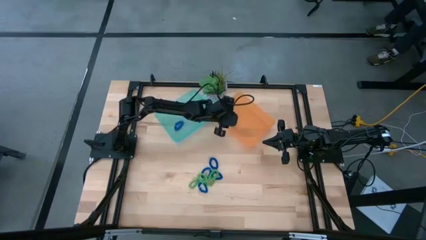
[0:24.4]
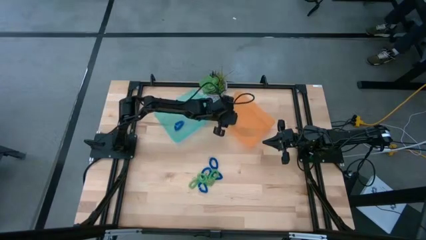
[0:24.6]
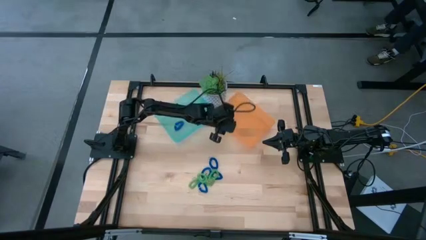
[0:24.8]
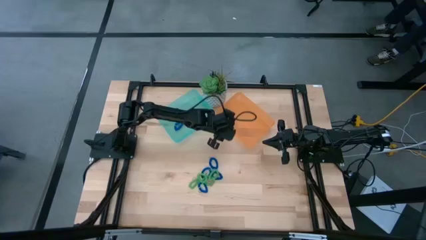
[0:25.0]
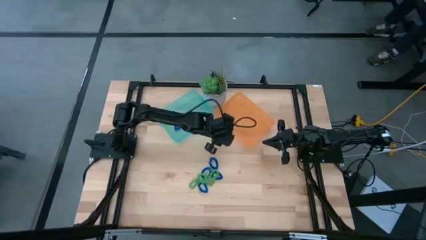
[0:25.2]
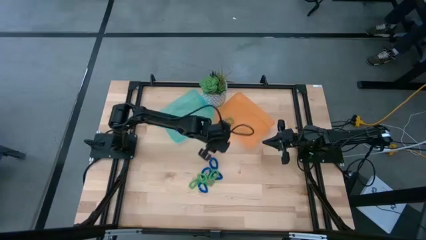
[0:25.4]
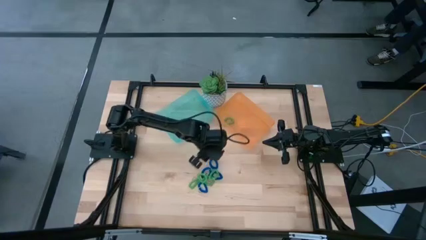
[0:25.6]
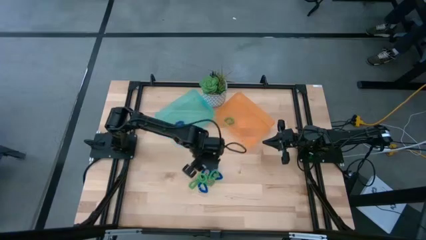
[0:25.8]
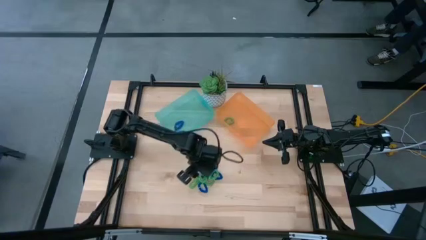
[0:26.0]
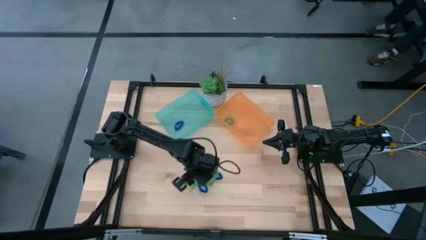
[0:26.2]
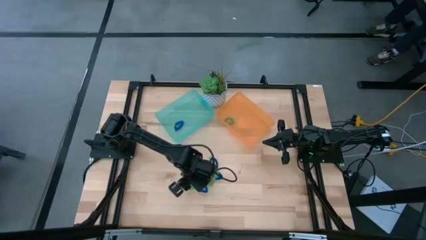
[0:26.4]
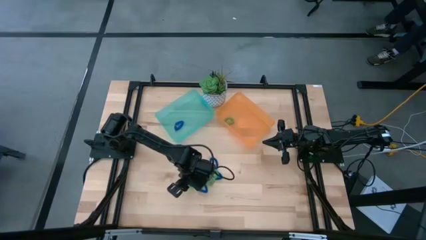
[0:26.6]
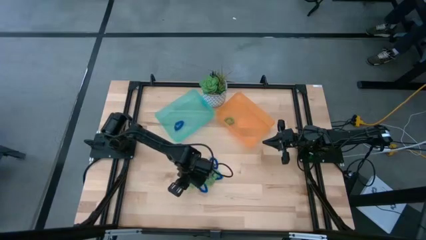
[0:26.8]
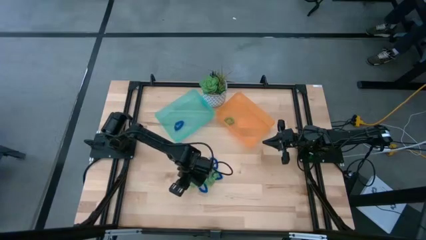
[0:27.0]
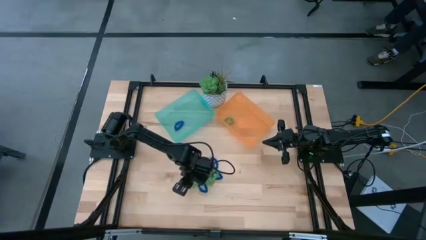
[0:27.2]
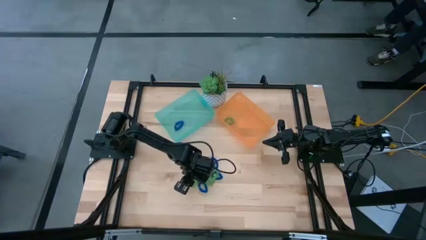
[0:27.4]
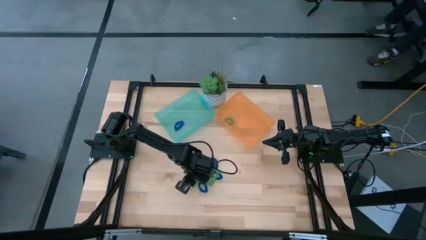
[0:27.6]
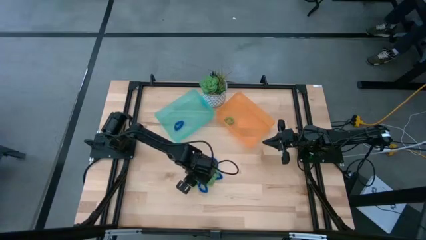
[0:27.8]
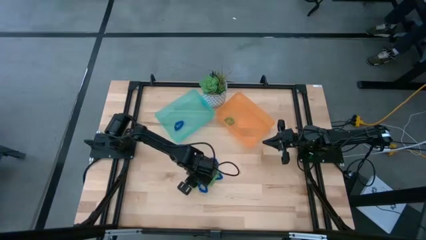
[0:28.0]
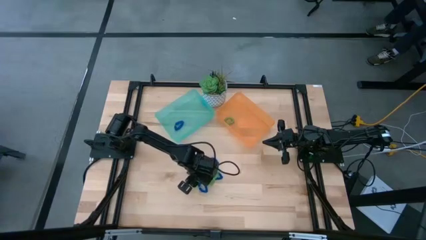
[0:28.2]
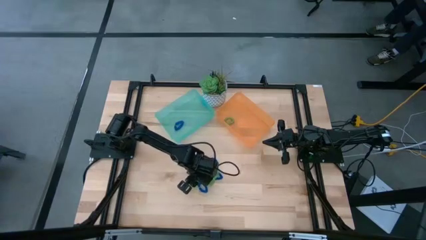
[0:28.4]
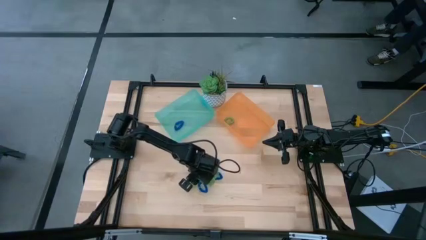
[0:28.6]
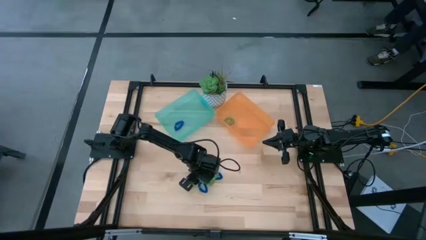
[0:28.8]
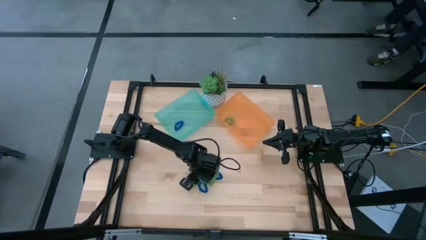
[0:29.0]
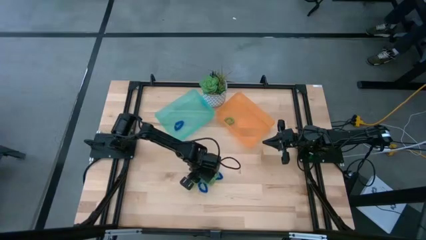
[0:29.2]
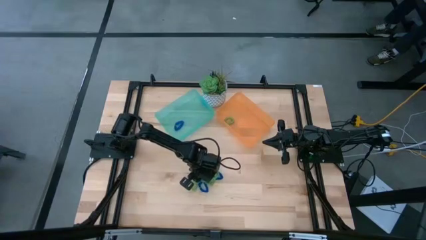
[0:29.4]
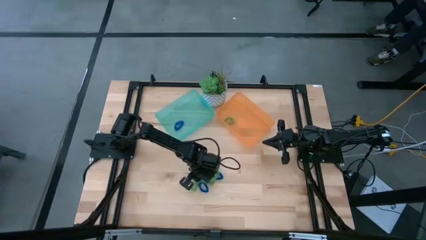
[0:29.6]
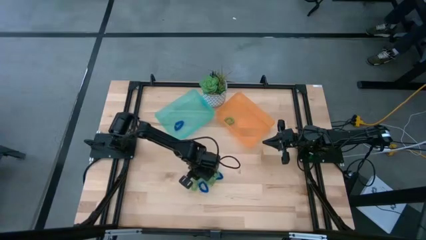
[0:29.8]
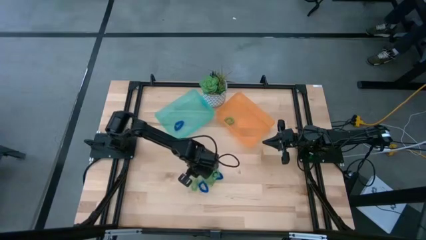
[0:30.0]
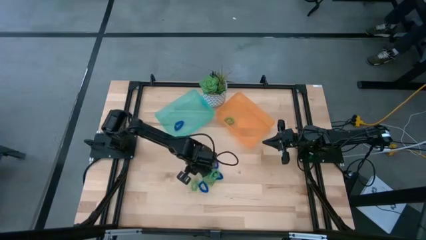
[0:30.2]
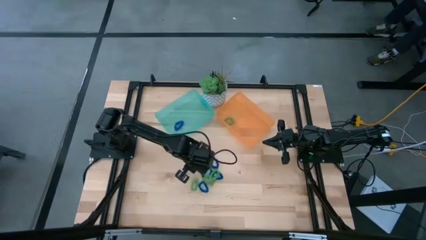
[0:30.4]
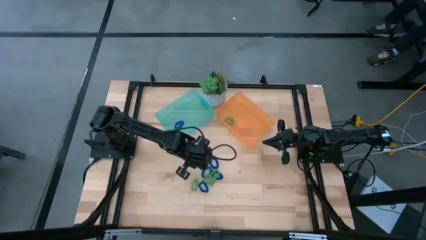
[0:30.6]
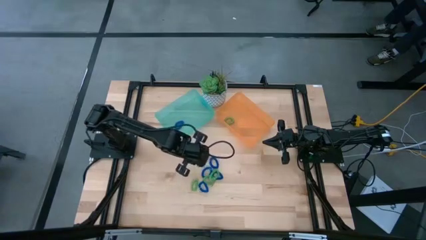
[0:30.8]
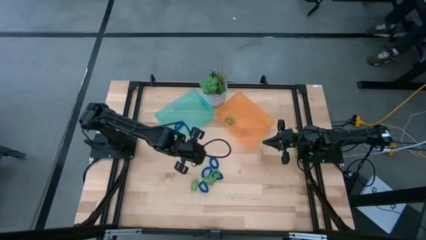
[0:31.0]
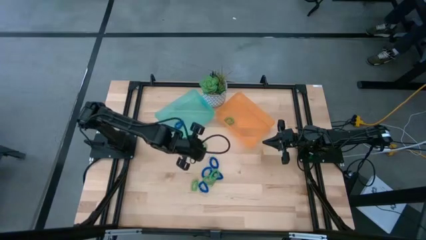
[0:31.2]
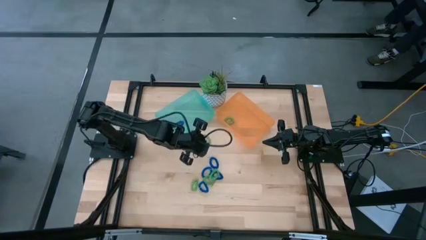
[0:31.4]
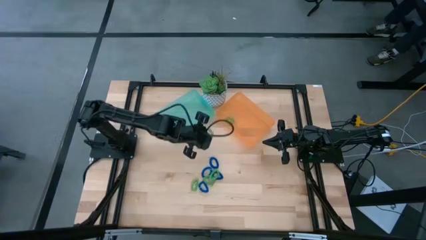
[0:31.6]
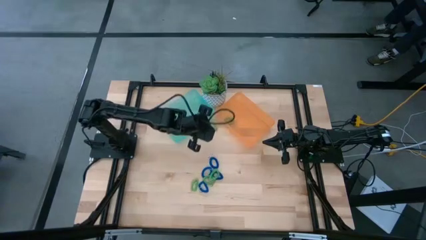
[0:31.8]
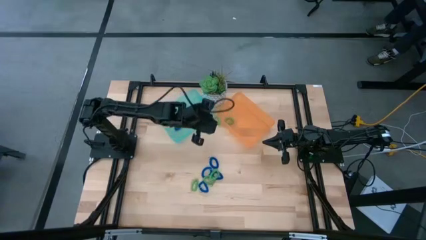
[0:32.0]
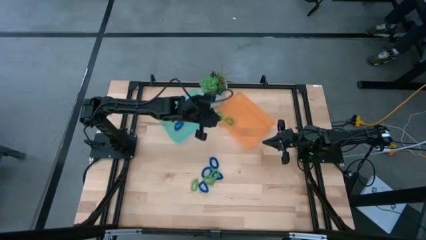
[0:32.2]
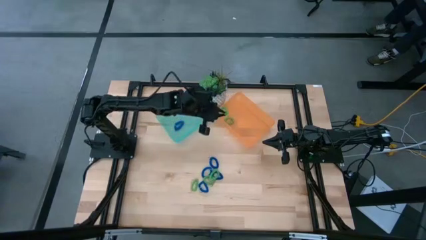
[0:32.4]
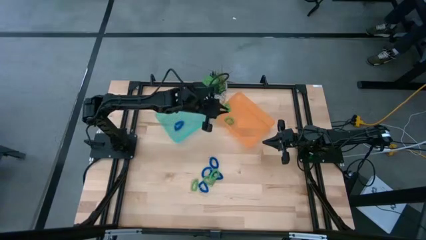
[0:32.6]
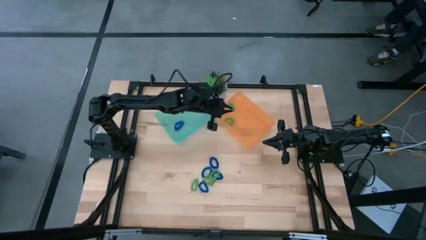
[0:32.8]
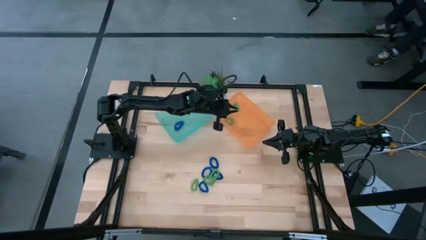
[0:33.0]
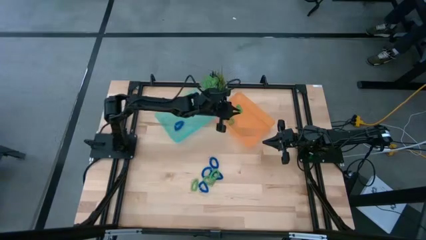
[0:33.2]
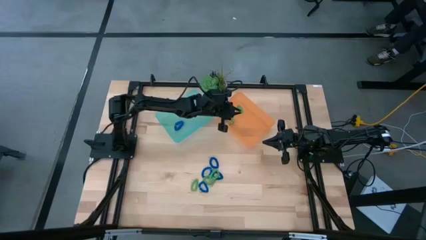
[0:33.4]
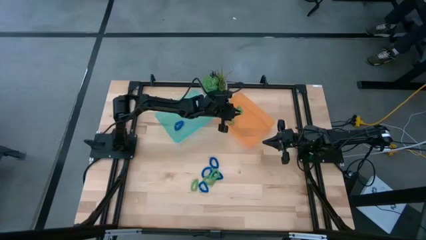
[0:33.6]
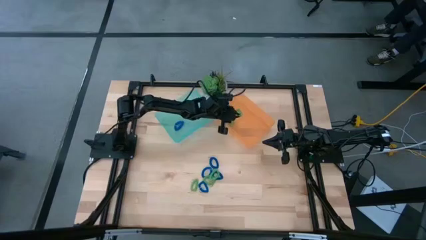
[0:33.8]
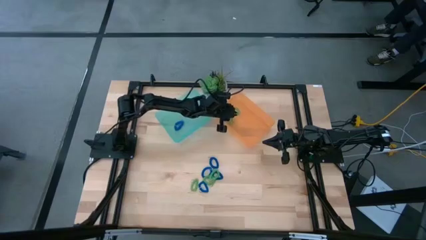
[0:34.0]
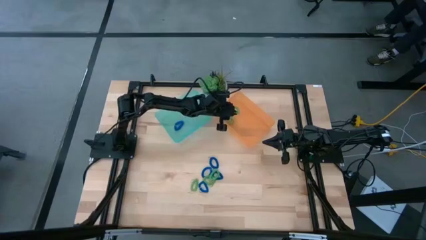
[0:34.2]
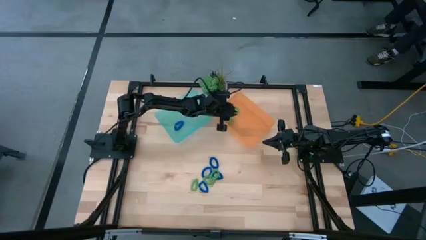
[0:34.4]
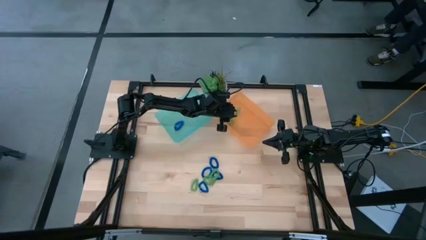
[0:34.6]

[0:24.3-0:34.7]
Task: Sort spring keychains
Put the green spring keychain into the orange bin

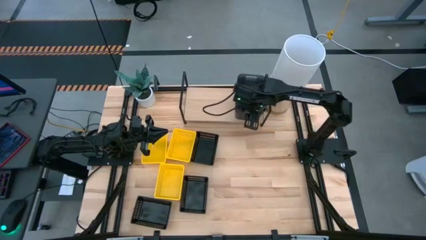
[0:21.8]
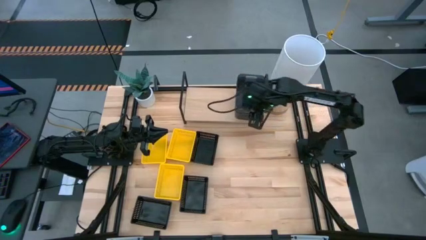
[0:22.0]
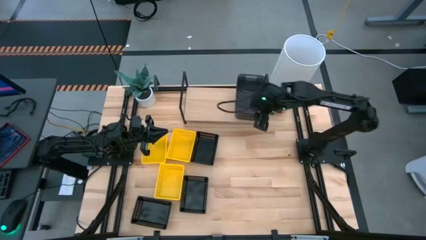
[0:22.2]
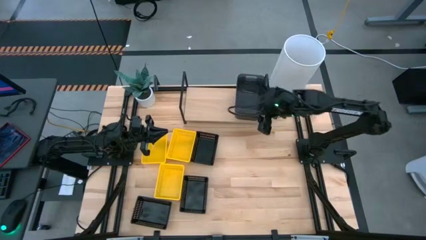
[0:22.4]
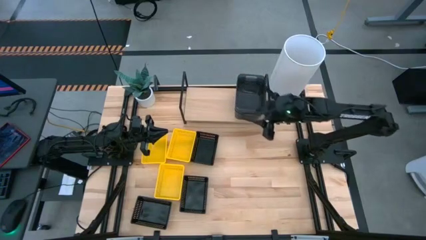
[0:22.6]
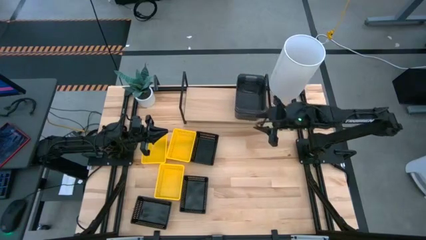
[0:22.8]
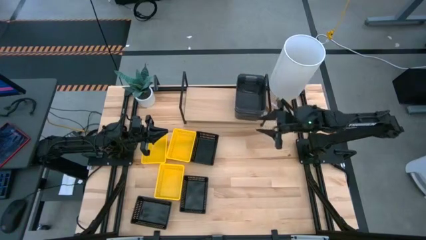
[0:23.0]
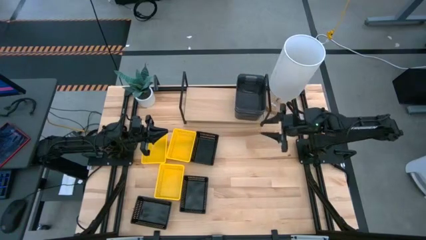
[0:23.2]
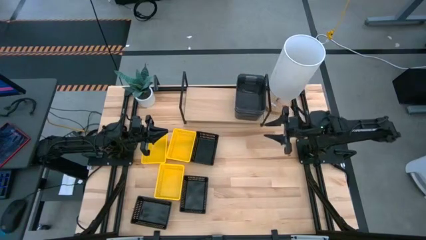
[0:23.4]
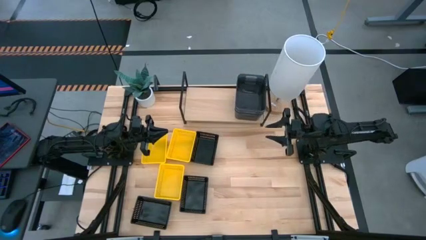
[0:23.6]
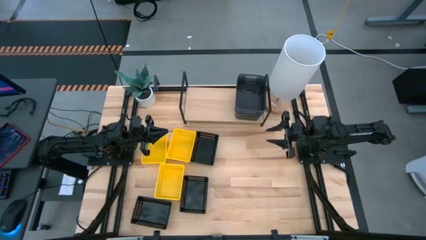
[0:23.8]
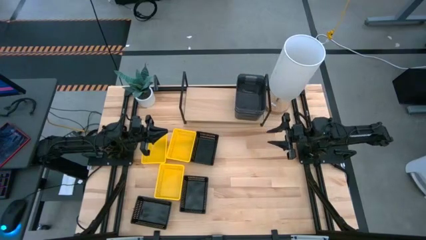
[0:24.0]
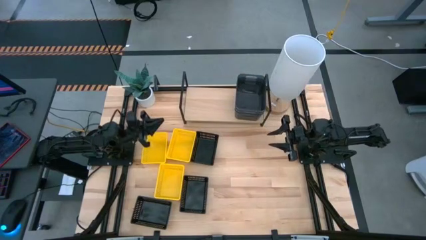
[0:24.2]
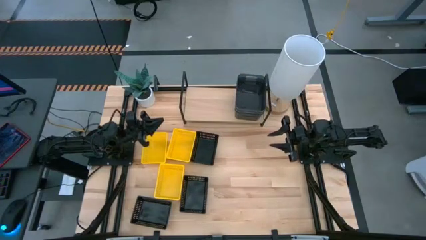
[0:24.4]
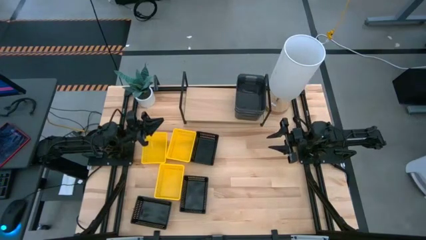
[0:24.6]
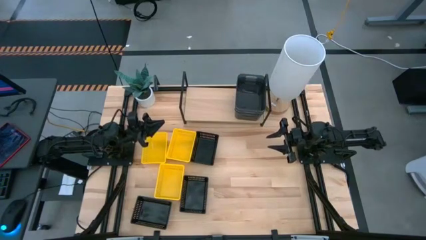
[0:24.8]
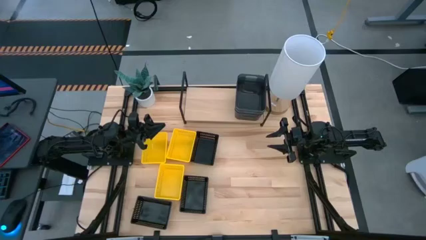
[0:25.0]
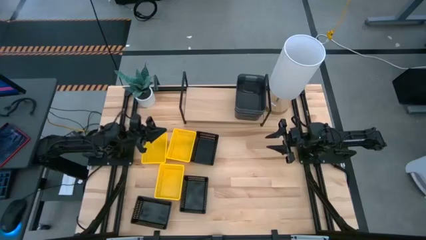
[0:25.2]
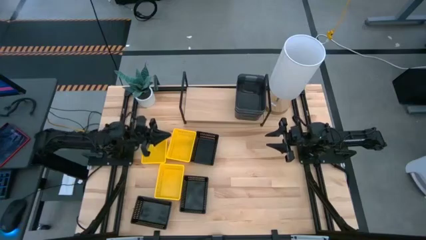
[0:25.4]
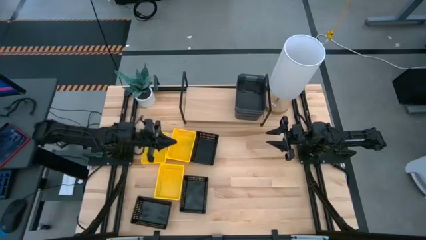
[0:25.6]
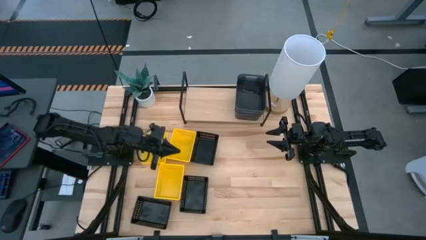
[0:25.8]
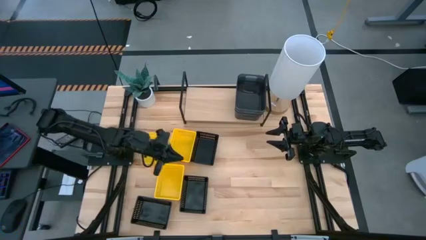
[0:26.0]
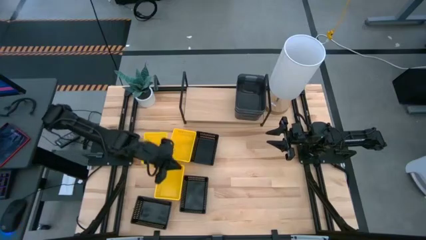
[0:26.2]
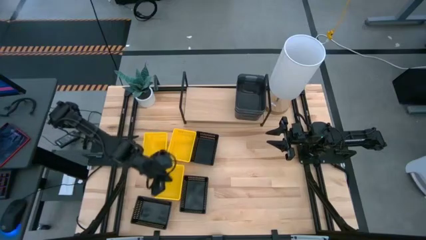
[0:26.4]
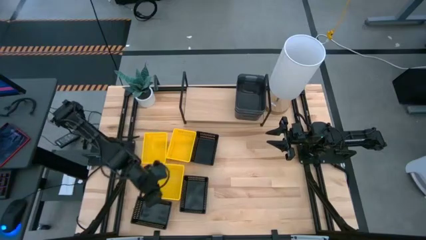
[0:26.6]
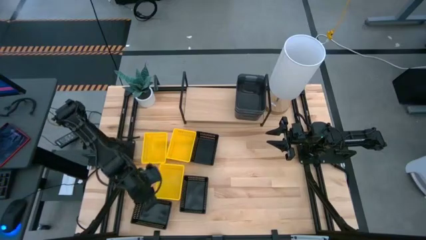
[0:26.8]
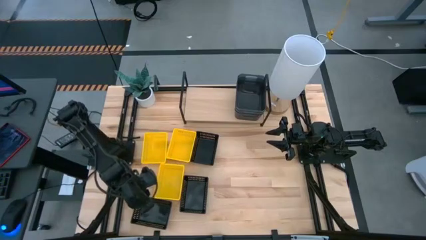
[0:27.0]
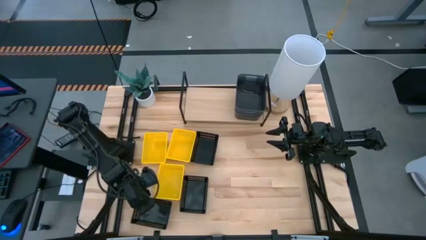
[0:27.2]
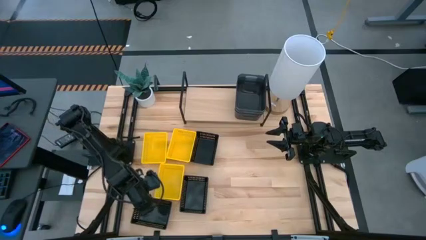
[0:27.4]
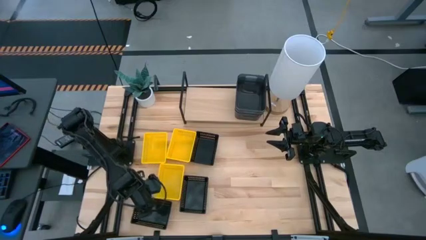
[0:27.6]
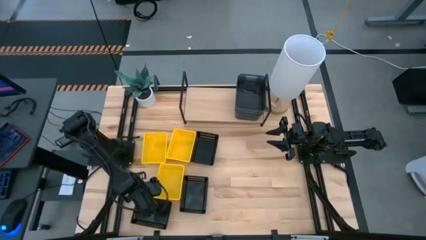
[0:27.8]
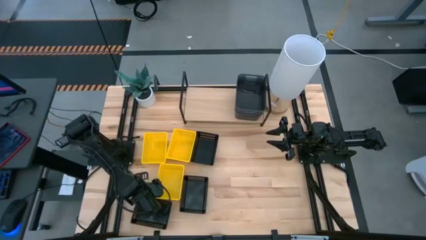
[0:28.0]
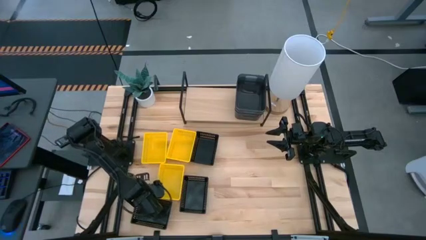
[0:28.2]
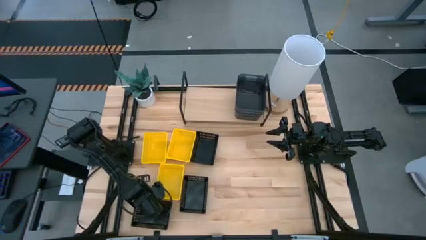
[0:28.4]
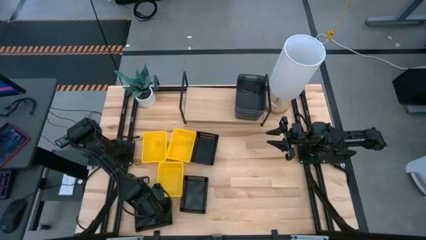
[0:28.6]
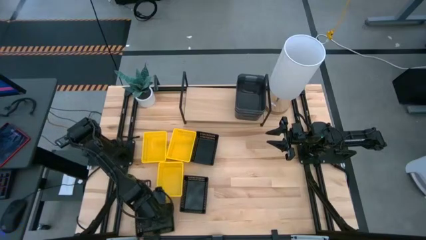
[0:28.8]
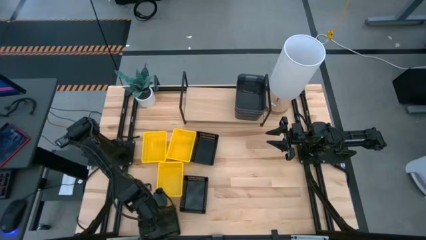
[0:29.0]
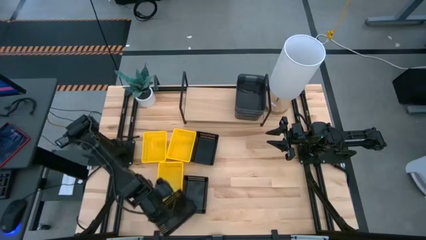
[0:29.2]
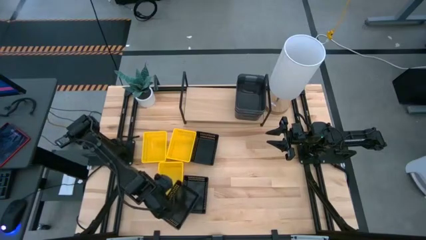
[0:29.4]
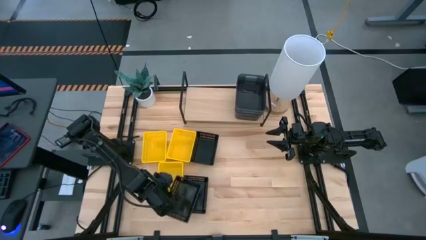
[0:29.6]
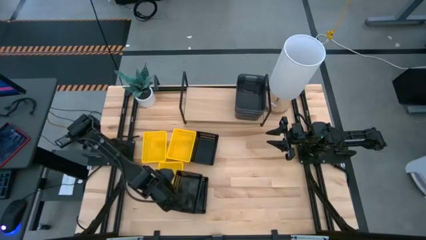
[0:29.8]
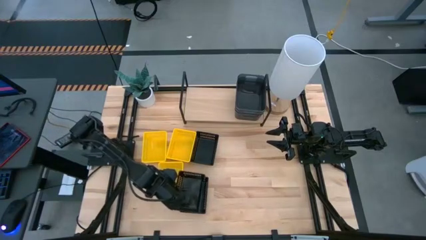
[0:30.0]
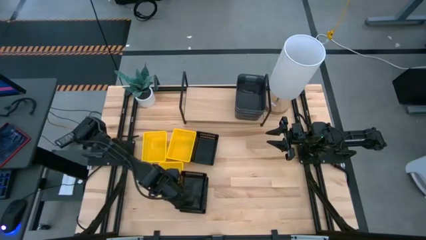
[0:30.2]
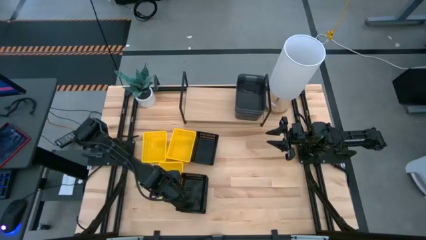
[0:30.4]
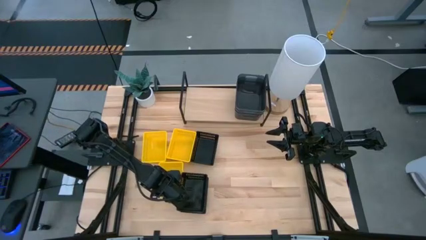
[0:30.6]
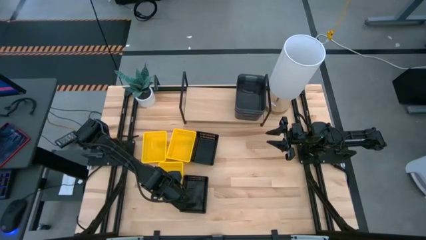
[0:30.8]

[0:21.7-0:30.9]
Task: Stack baskets on shelf by color
Stack the bottom black basket on the center black basket
